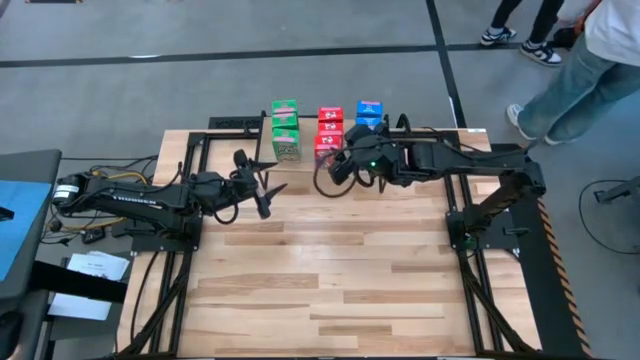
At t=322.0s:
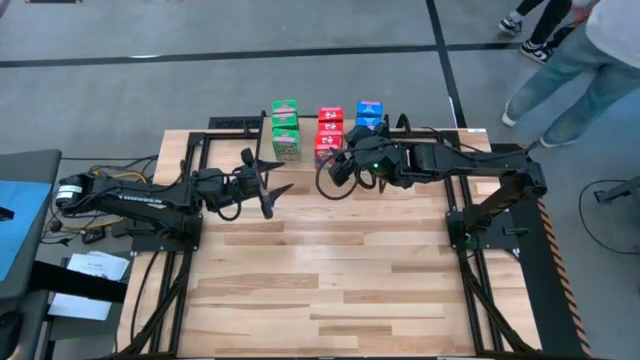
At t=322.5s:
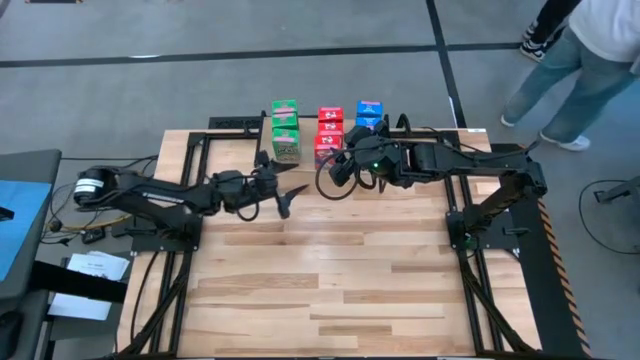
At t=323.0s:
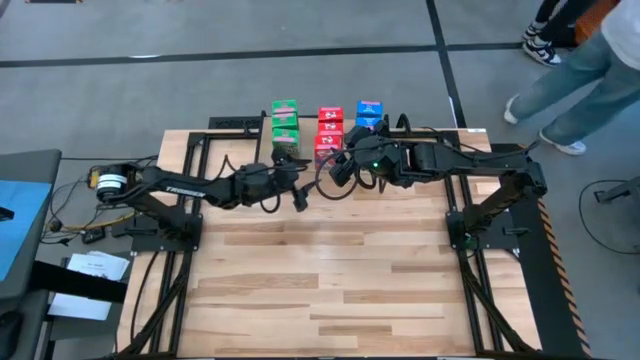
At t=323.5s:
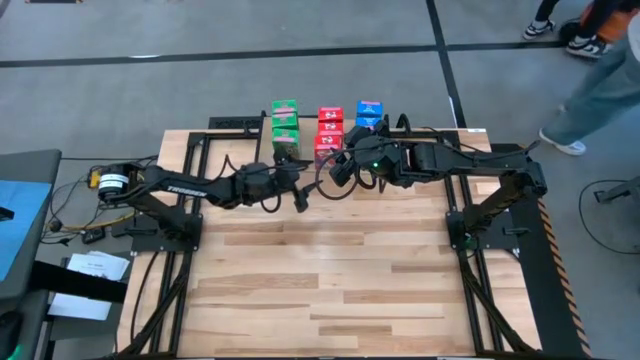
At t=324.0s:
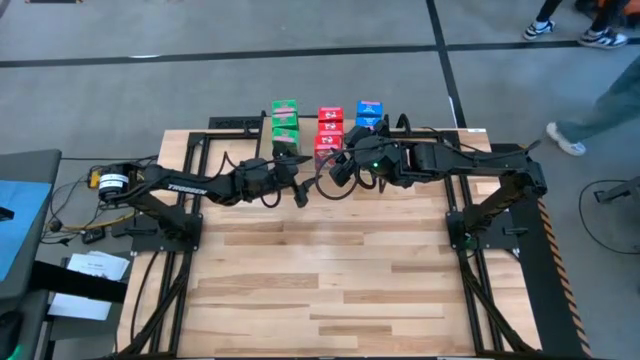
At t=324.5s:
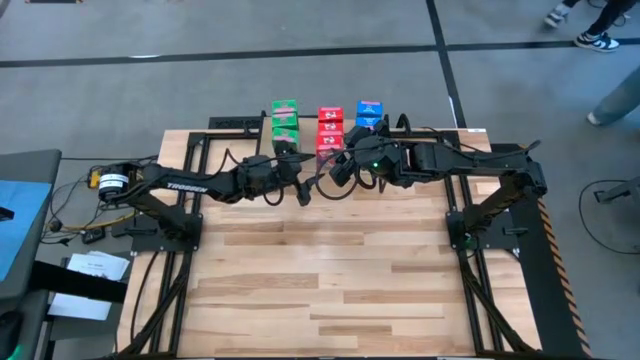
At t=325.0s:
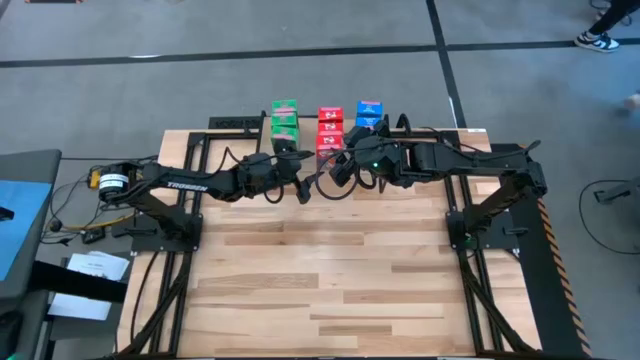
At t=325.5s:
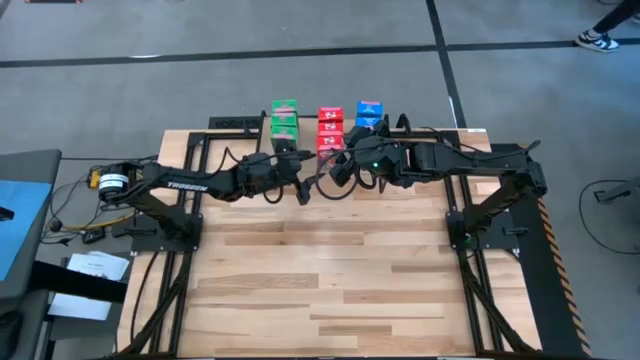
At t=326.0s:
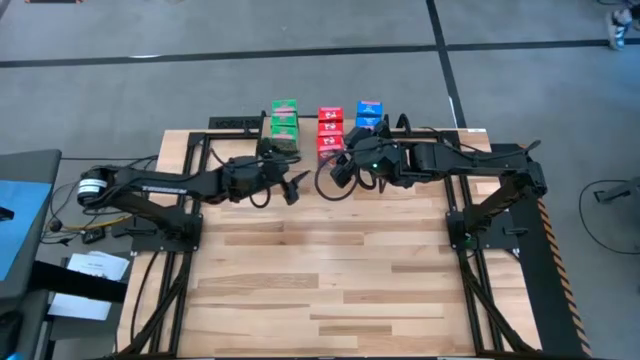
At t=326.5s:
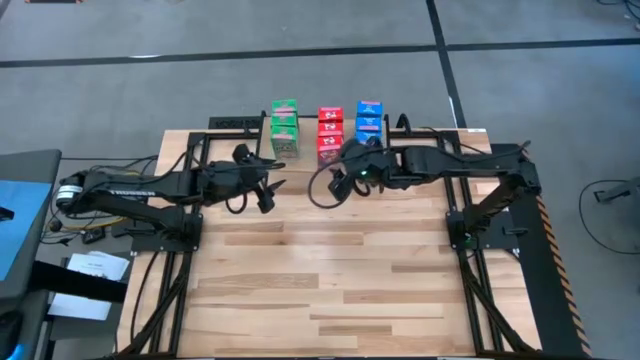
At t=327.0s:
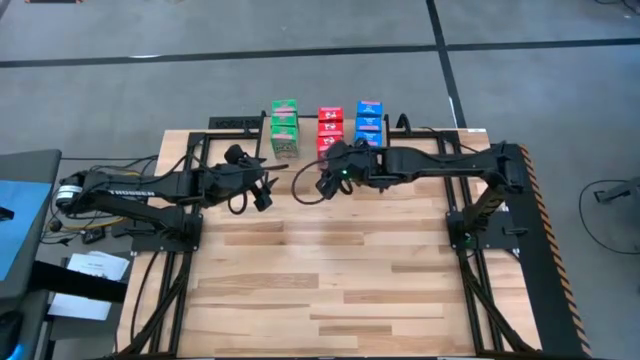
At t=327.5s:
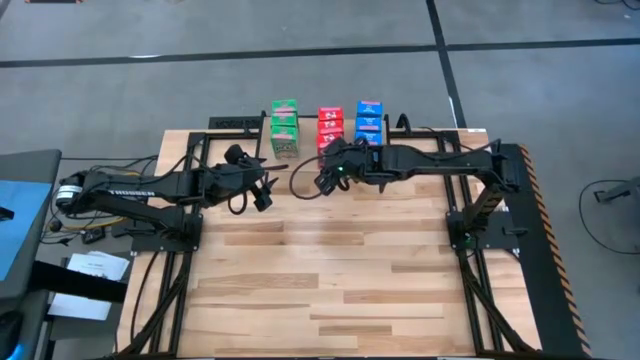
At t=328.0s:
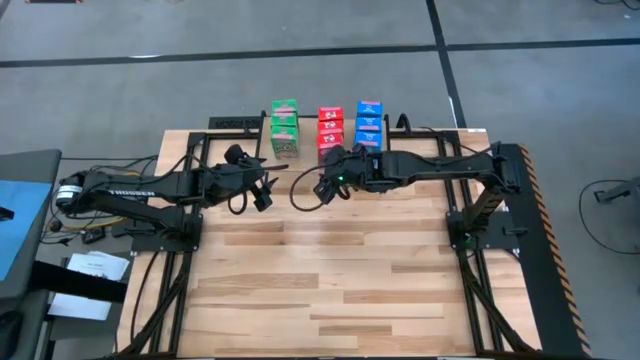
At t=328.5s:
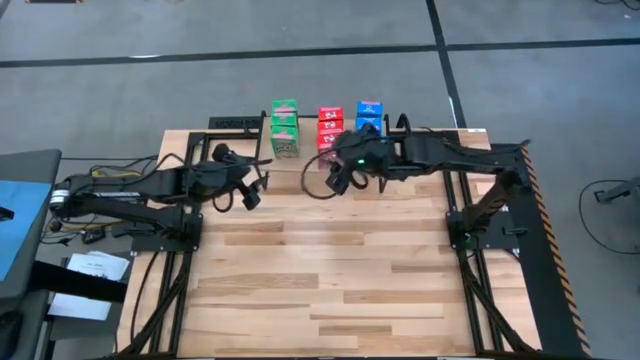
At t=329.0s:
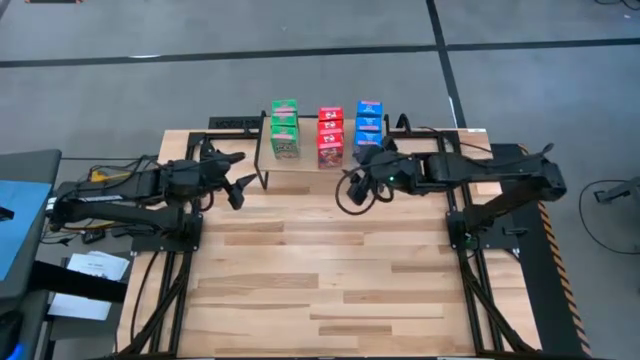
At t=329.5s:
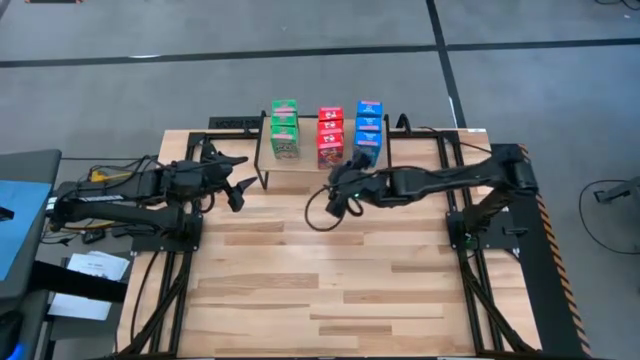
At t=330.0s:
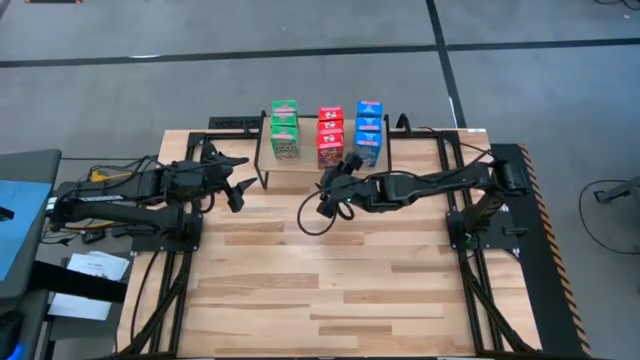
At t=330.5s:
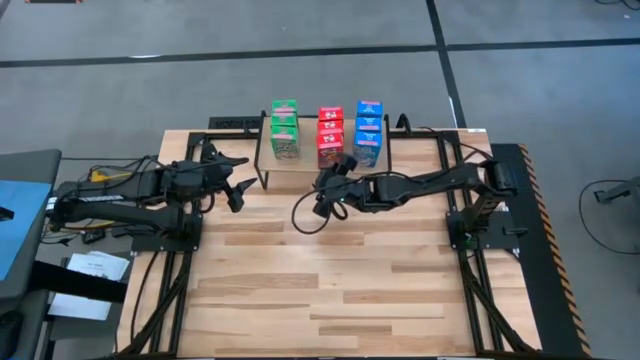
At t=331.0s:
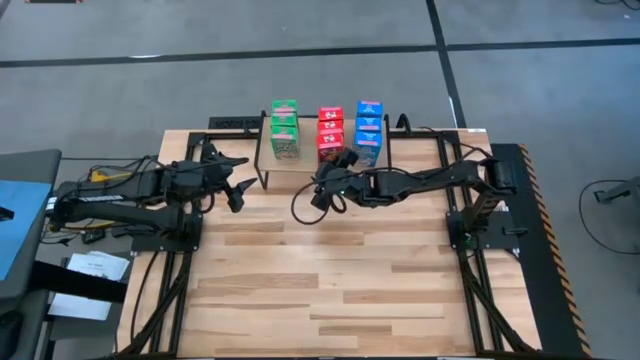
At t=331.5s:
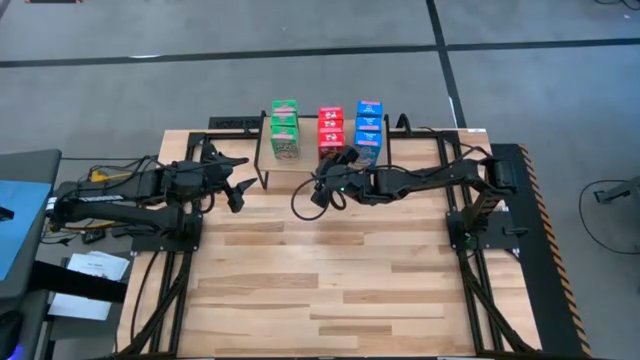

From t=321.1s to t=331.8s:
Task: Stack cereal on shelf
Adjust the red cereal box on the shelf

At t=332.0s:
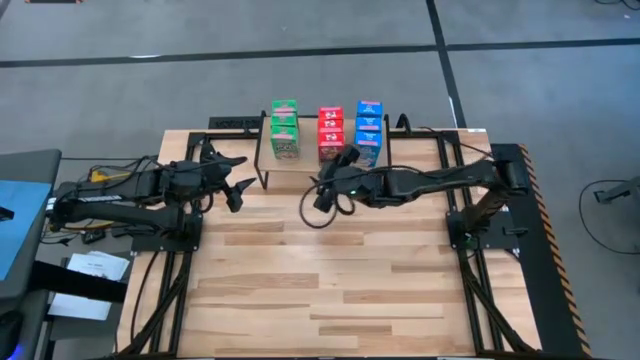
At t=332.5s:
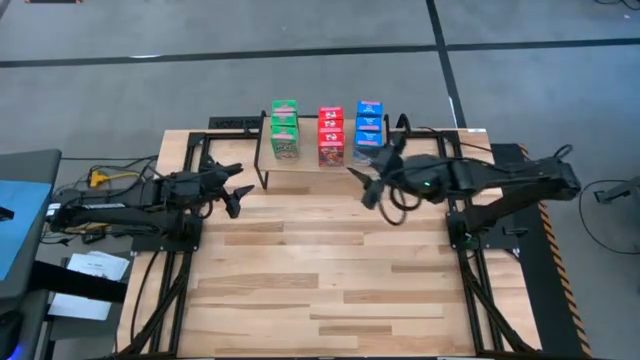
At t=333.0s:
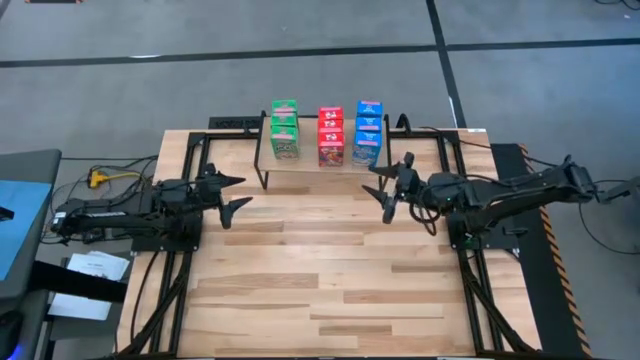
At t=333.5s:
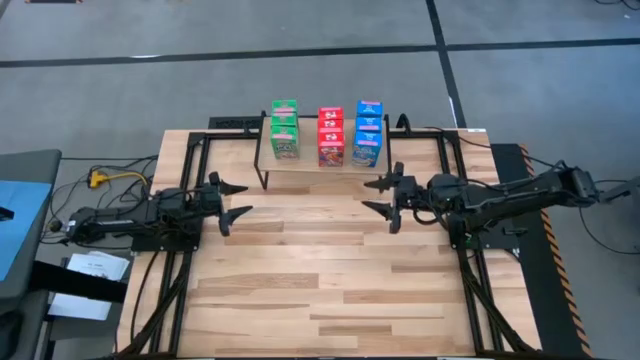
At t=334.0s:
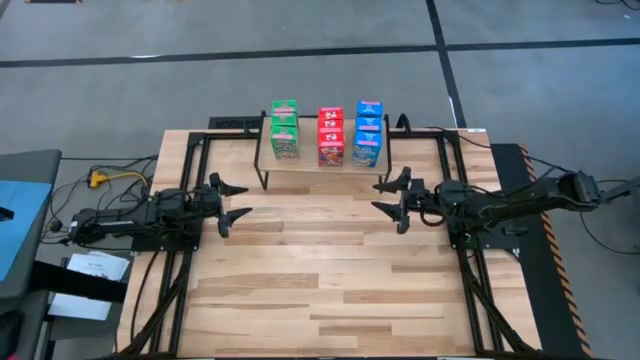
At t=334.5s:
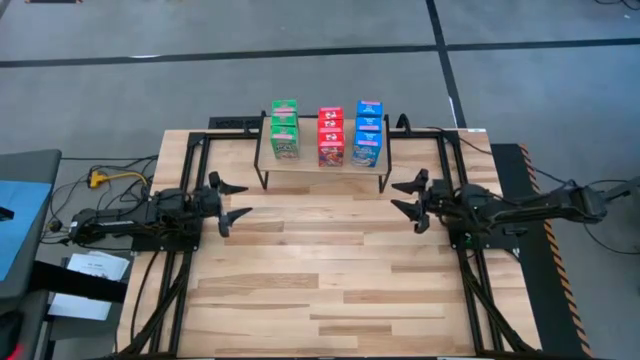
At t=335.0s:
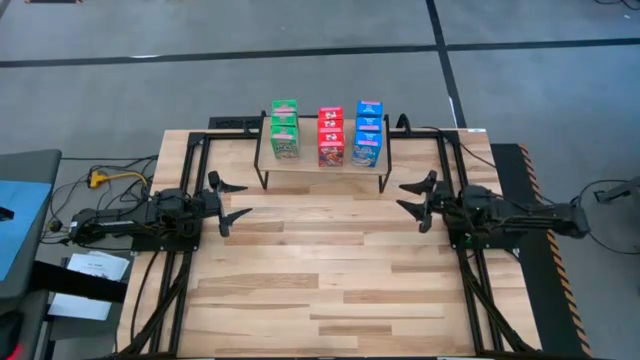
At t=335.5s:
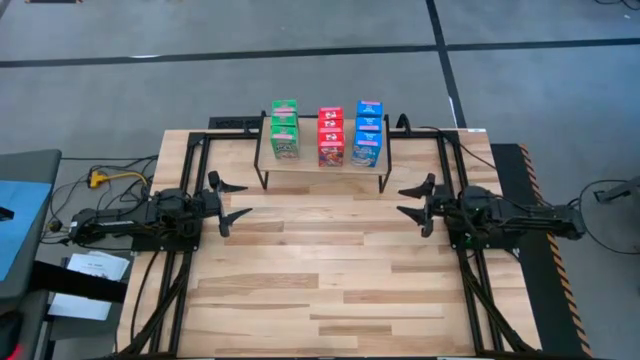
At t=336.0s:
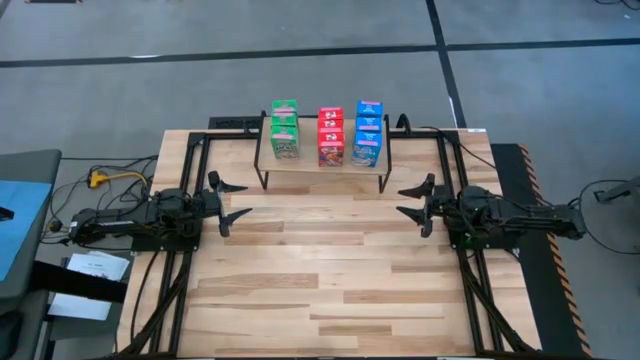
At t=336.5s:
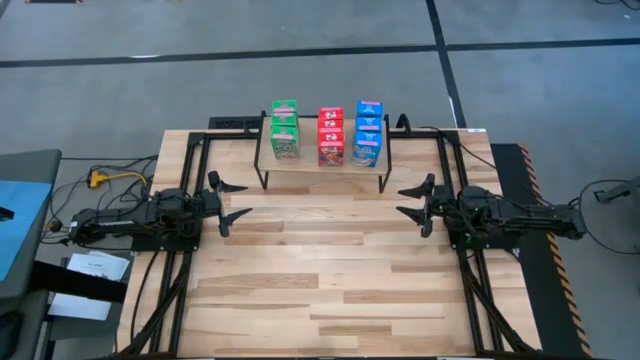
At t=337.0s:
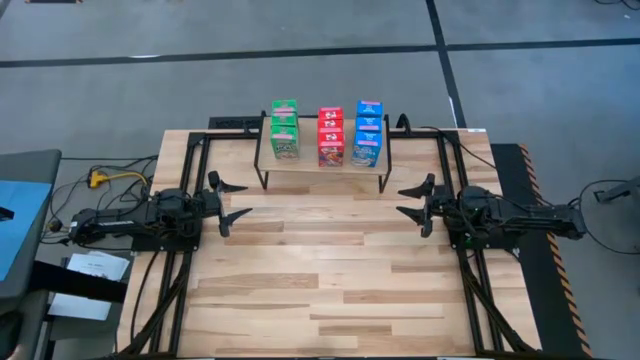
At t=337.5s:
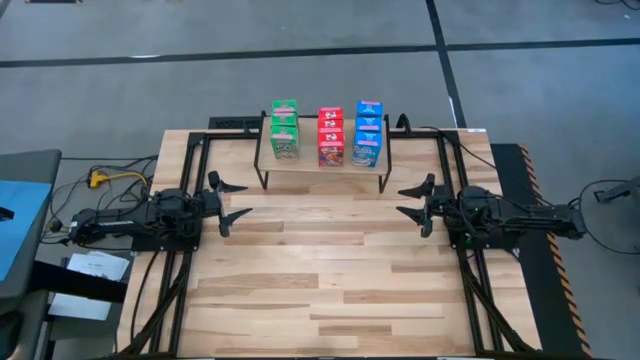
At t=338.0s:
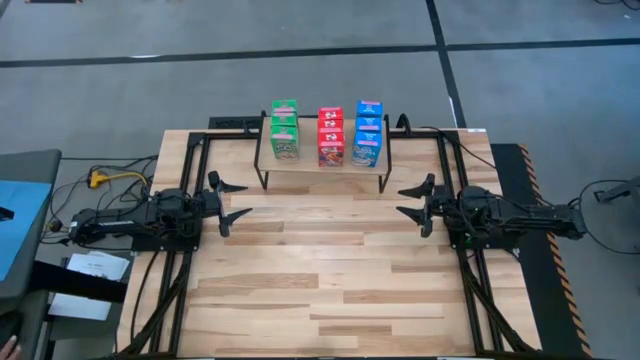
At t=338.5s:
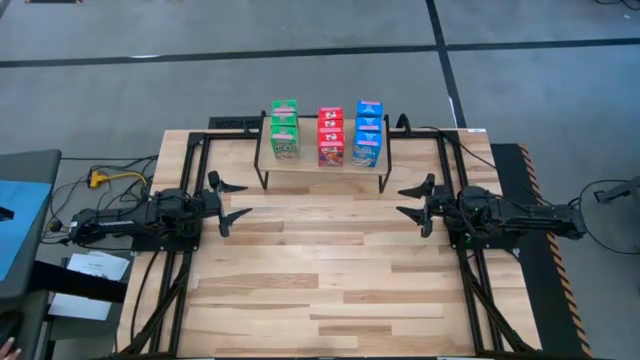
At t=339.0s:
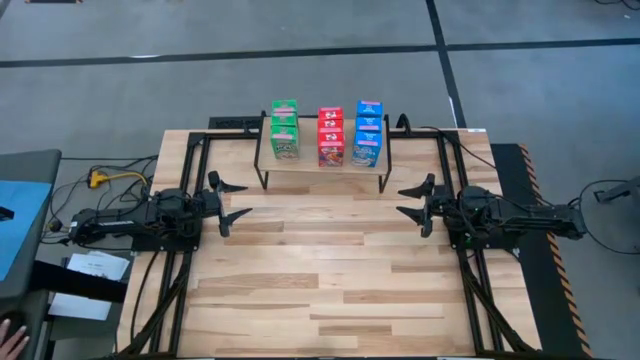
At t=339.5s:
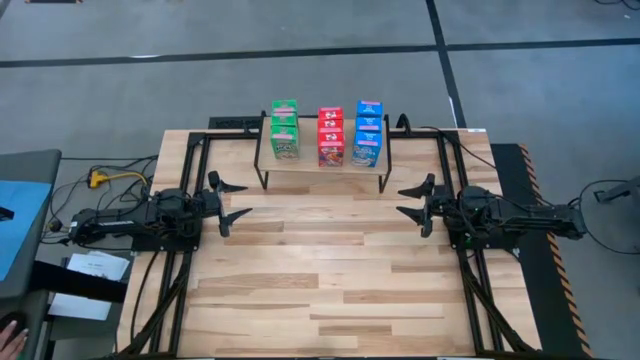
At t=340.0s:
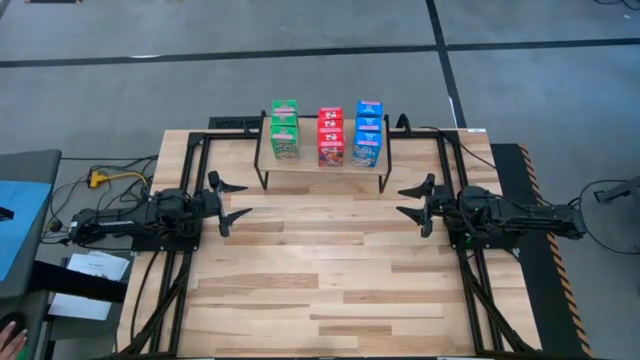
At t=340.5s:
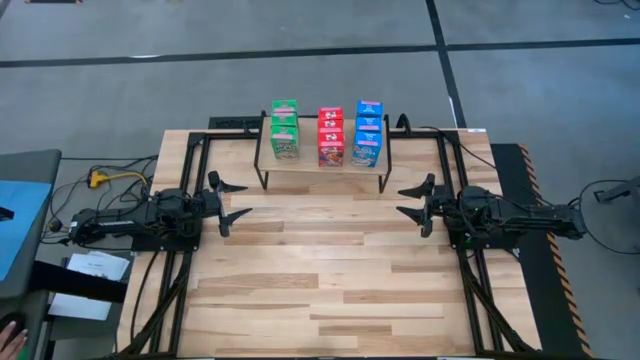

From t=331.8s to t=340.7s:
Return to Home Position
